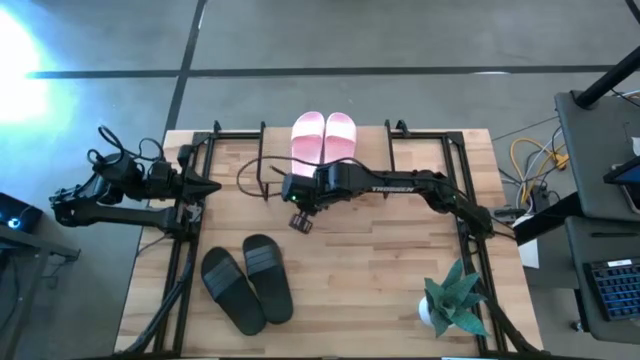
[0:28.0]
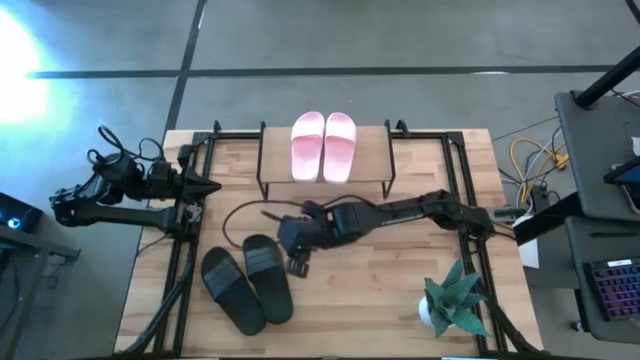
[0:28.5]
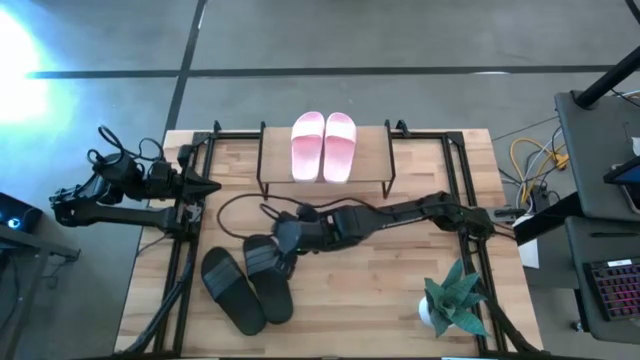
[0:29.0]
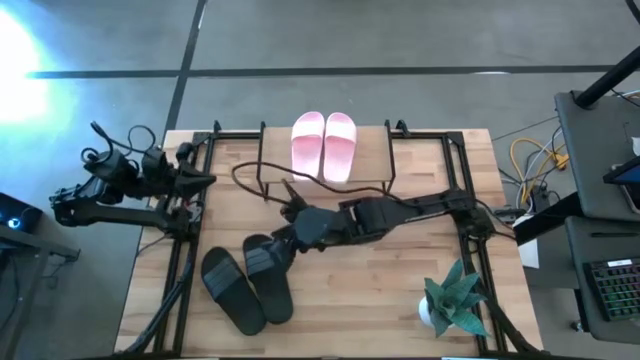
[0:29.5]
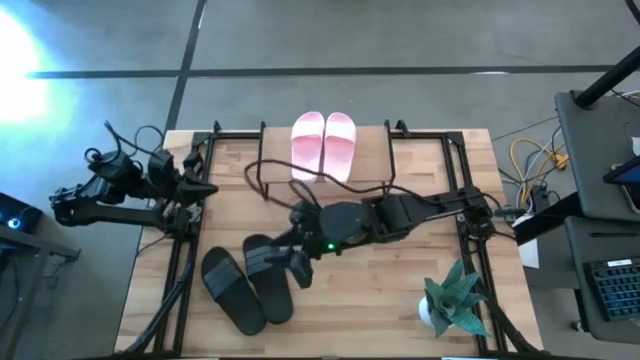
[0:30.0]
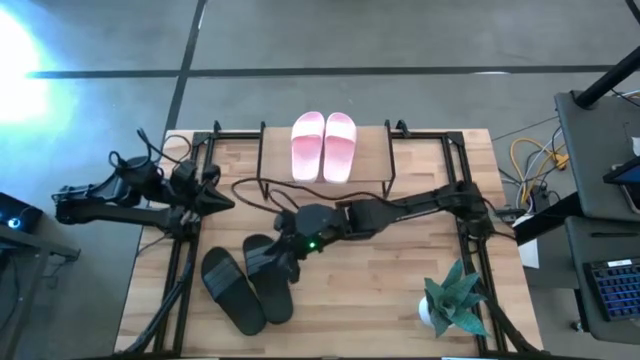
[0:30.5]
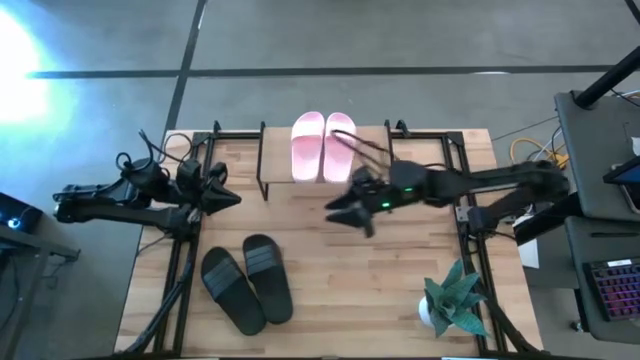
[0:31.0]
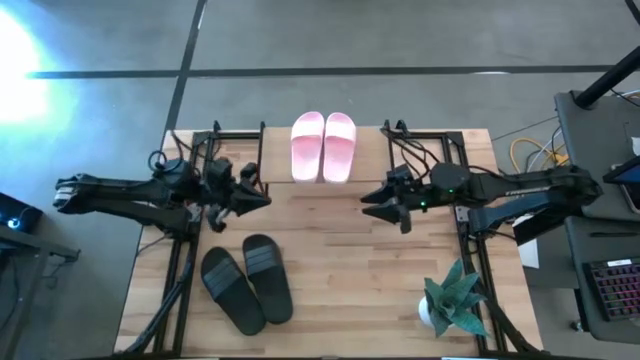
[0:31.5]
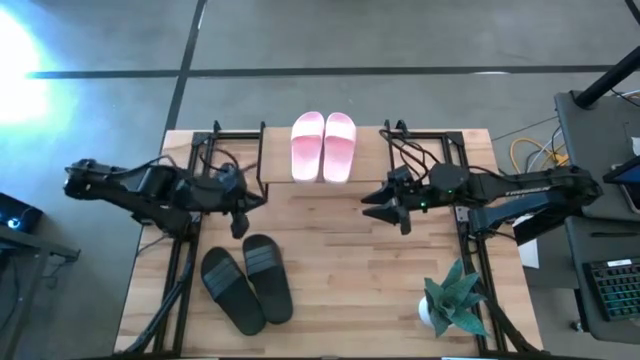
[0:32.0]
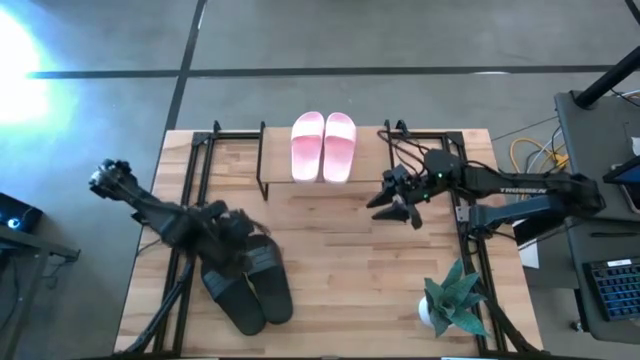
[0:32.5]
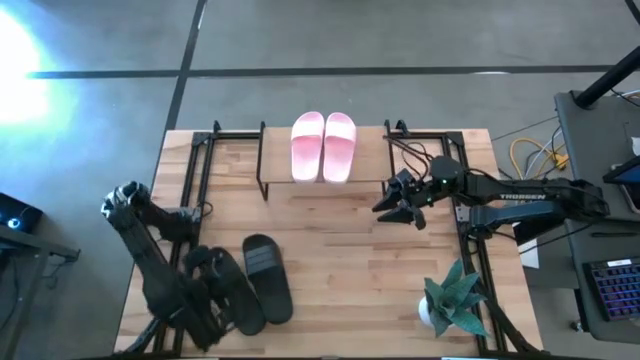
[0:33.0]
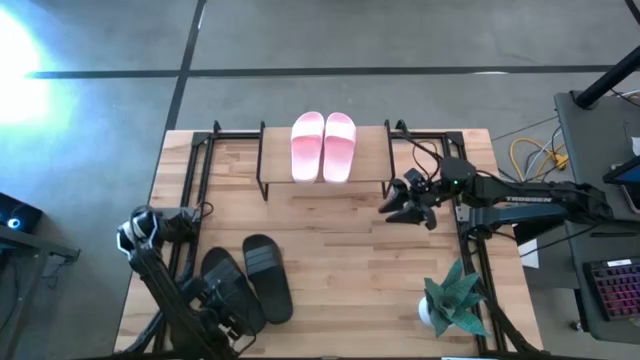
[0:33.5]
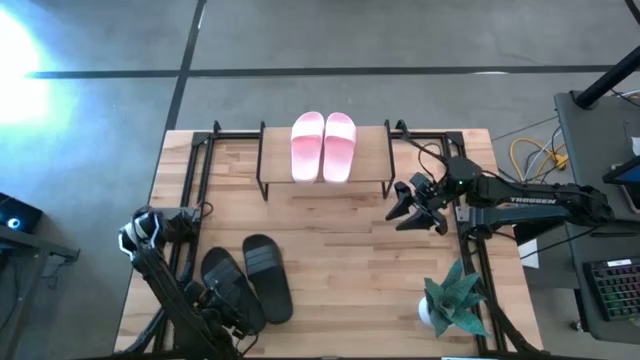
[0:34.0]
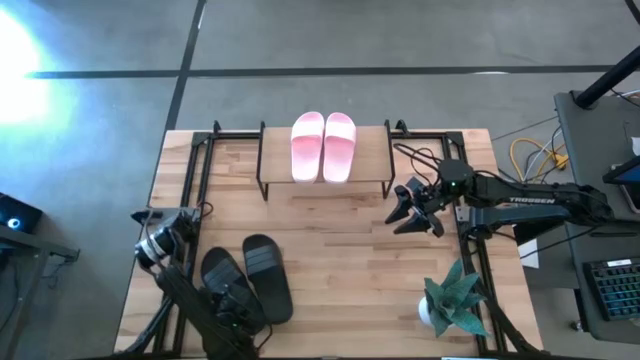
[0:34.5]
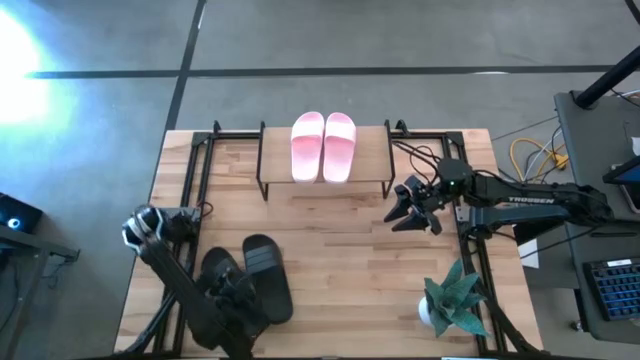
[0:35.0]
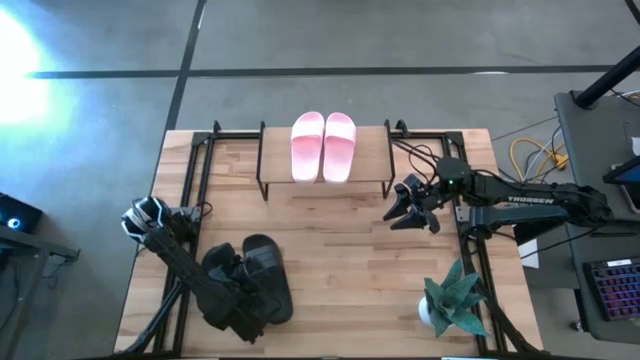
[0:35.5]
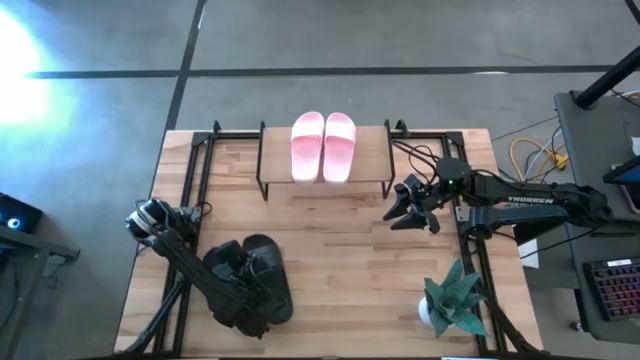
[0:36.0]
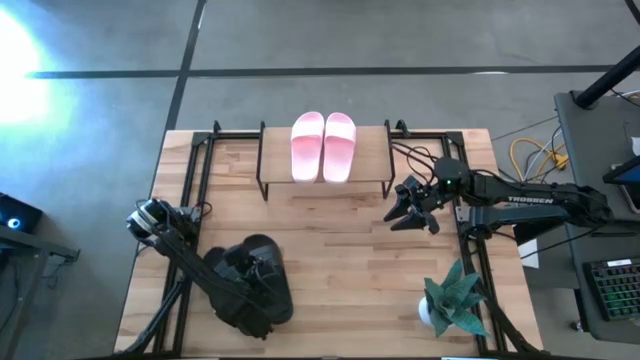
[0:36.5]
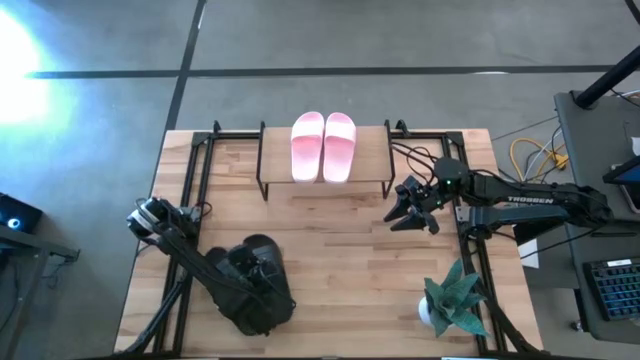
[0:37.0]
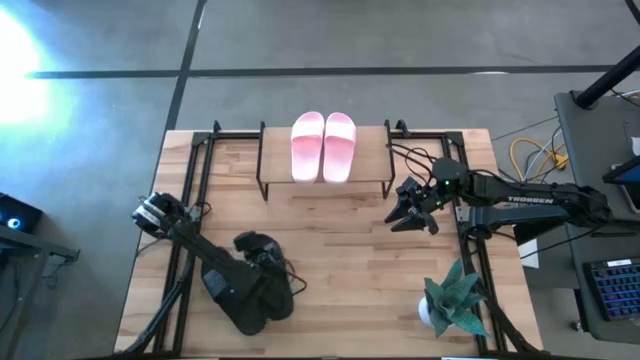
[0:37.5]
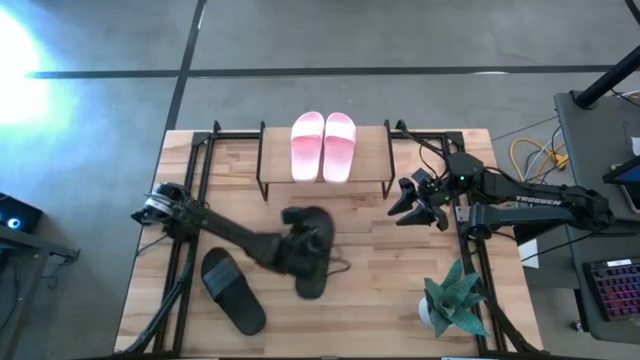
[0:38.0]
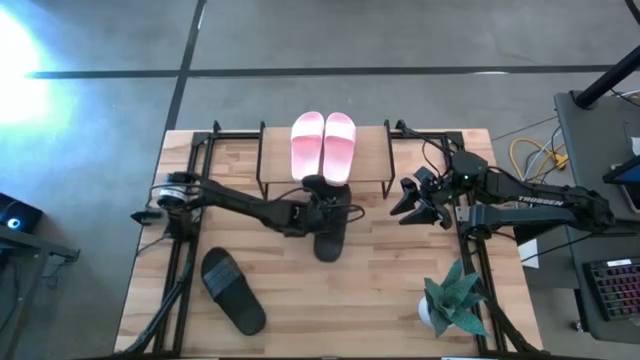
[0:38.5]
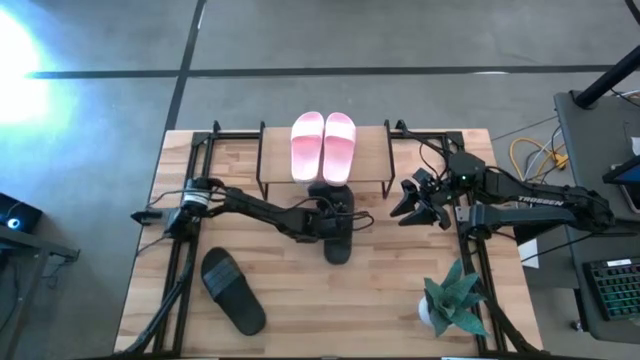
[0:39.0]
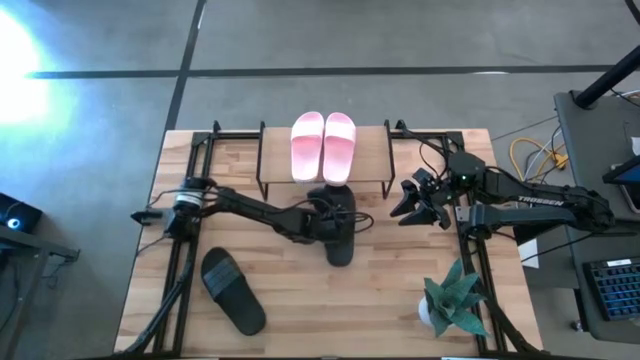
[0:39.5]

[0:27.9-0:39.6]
Task: Pick and place slides into the shelf
Move the right black slide under the shelf

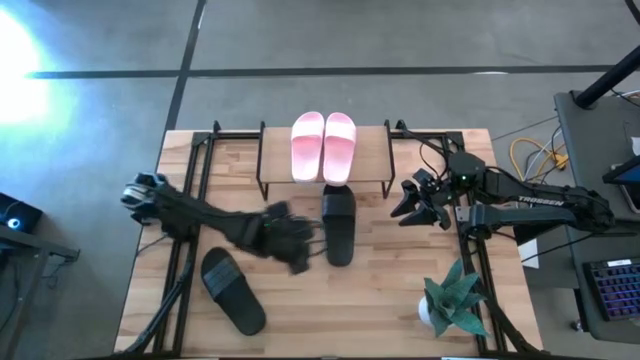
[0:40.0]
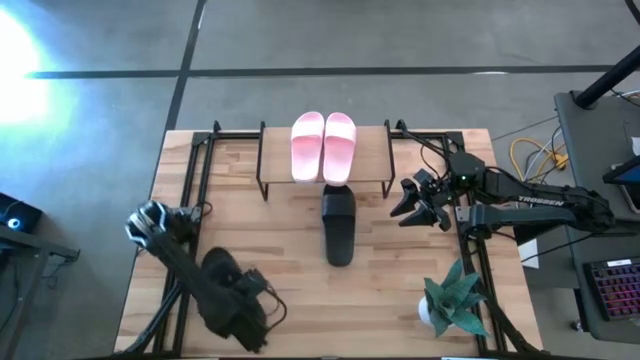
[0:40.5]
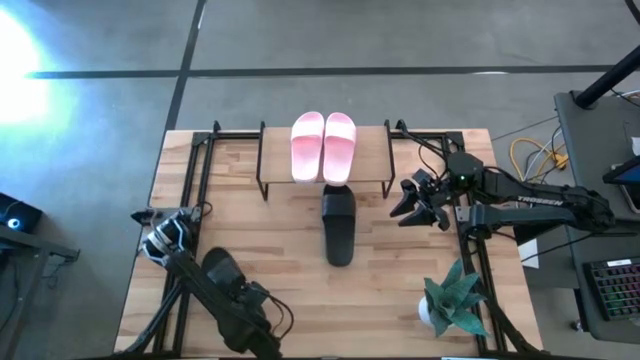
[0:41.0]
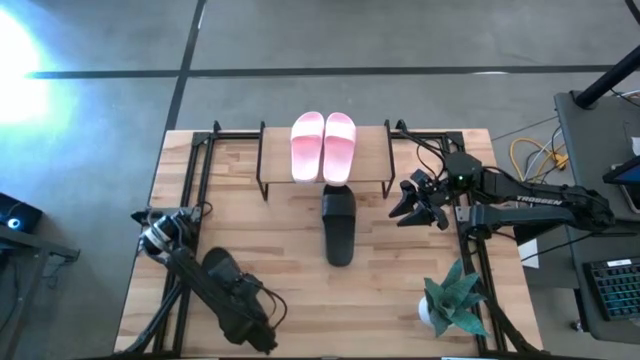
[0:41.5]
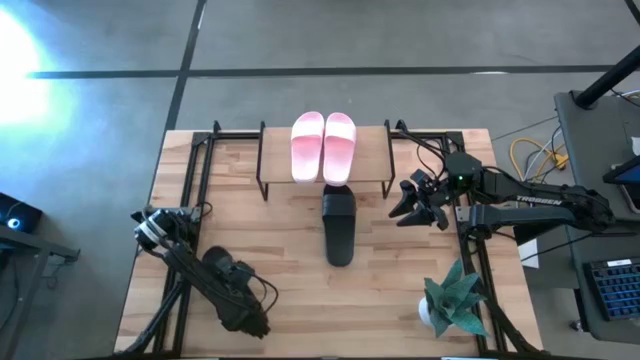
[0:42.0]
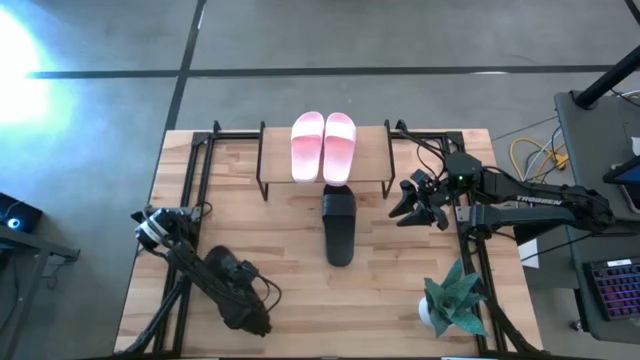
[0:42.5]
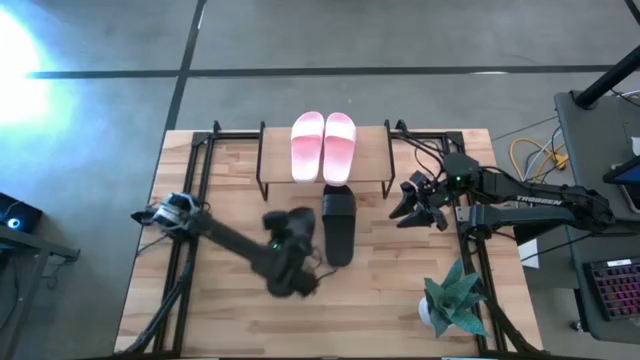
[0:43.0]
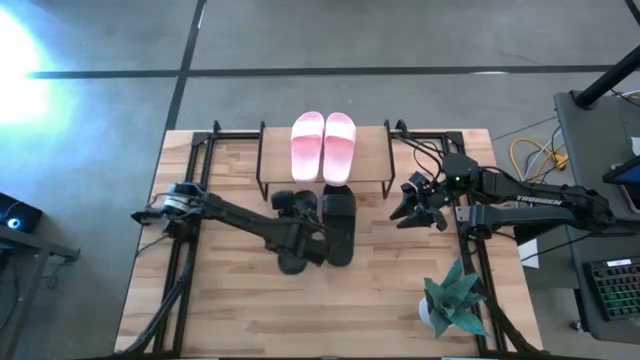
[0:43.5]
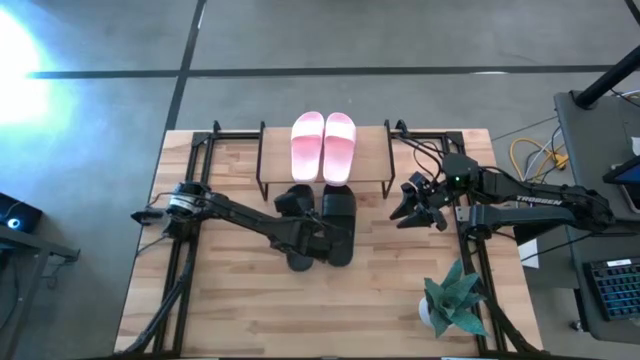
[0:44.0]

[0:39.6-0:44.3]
Move the black slide under the shelf

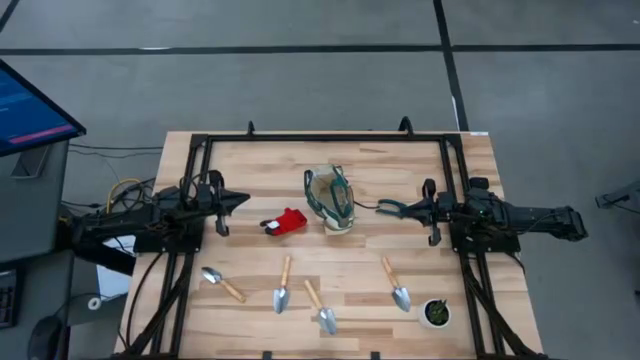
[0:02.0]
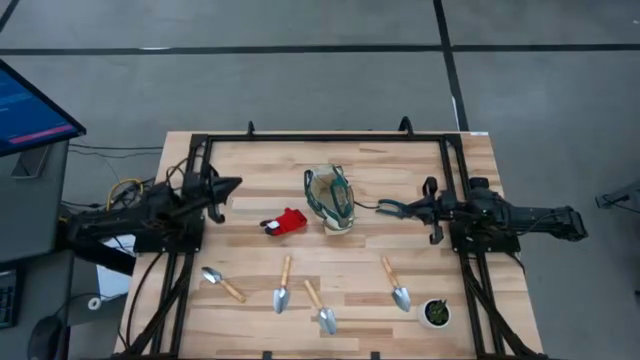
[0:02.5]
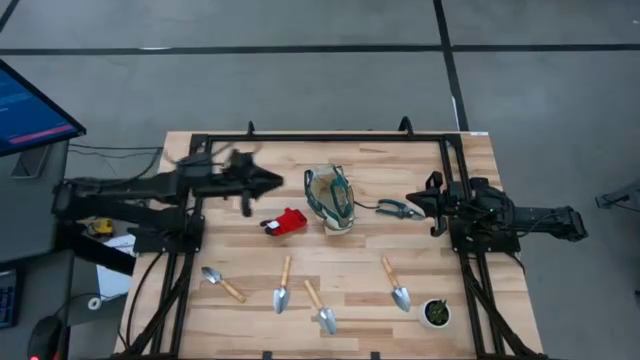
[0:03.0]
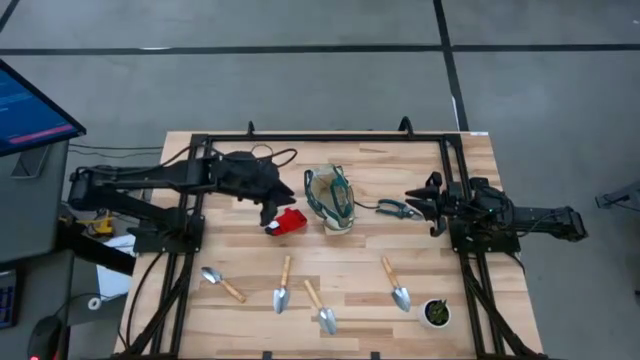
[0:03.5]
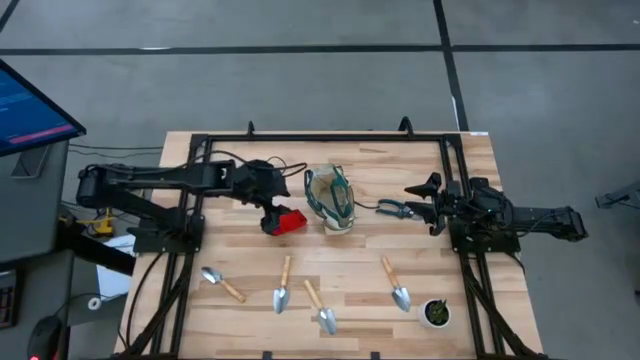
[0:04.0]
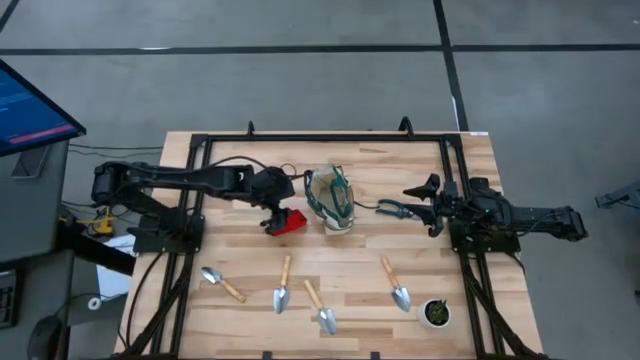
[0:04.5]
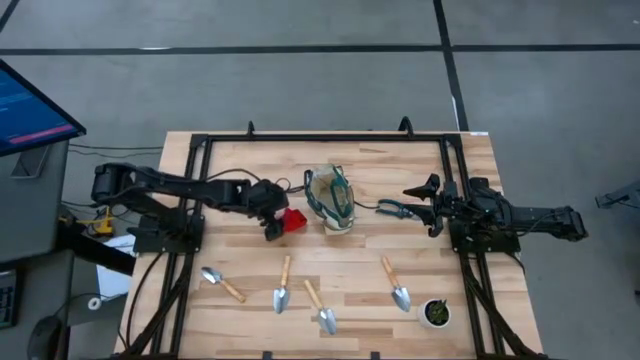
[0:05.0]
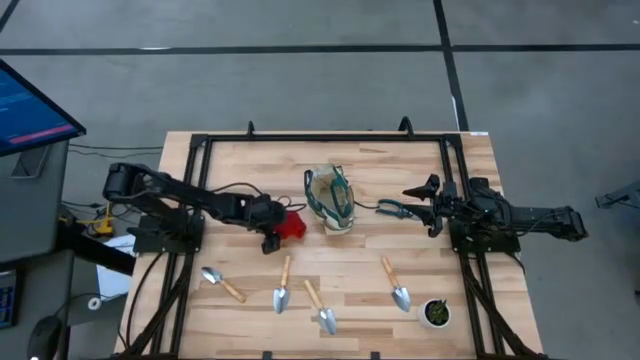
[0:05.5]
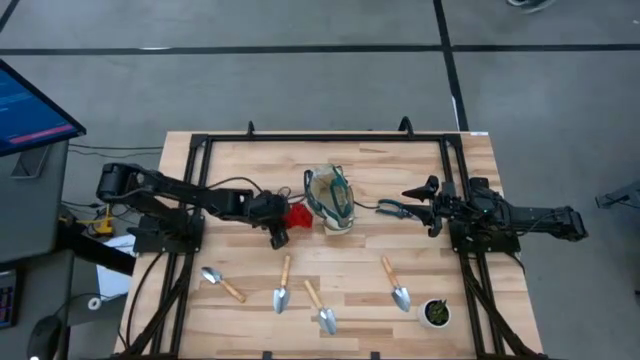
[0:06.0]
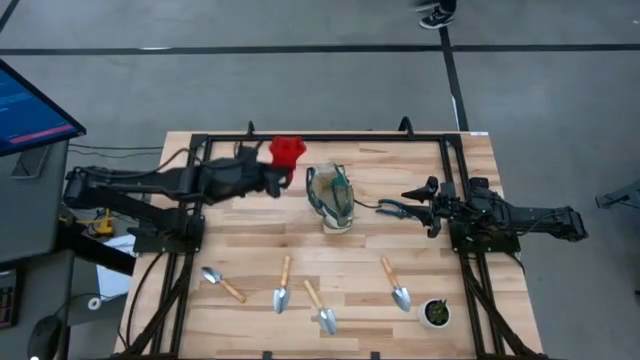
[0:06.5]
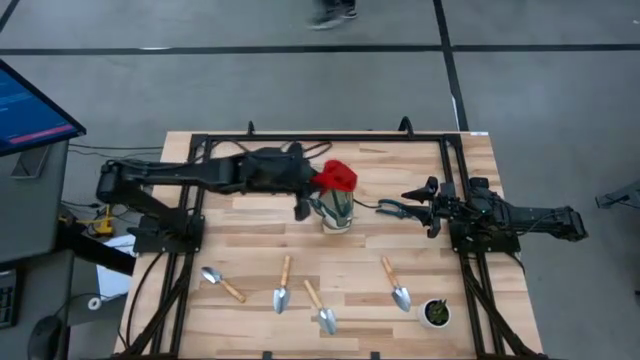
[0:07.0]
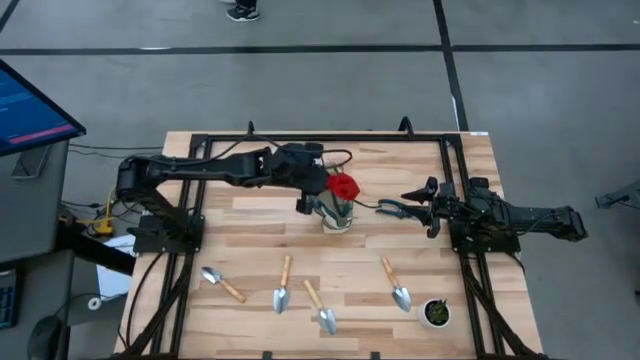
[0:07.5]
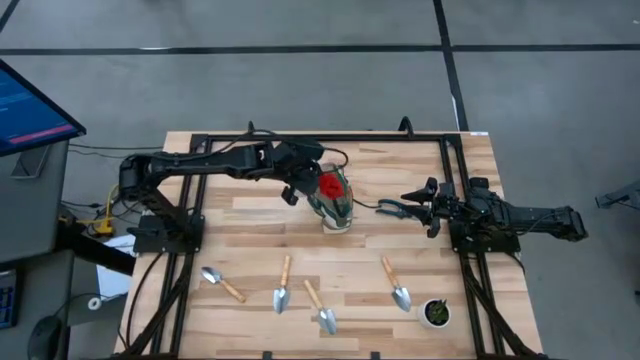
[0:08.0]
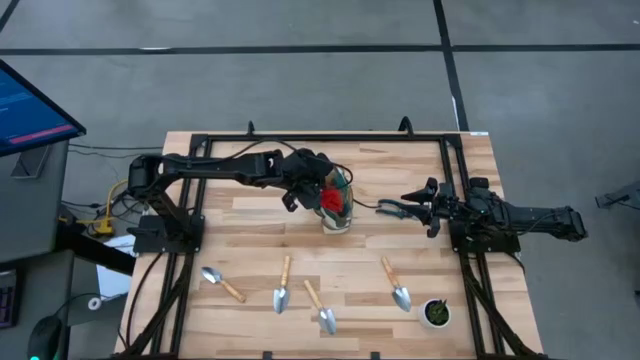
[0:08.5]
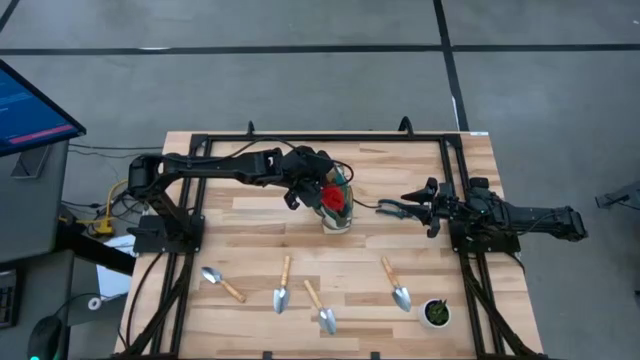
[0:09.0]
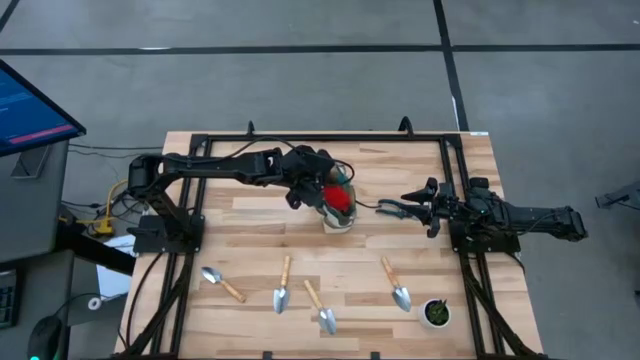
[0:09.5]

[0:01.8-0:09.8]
Task: Pick & Place Garden tools in Gardening bag
Put the gloves into the gardening bag
